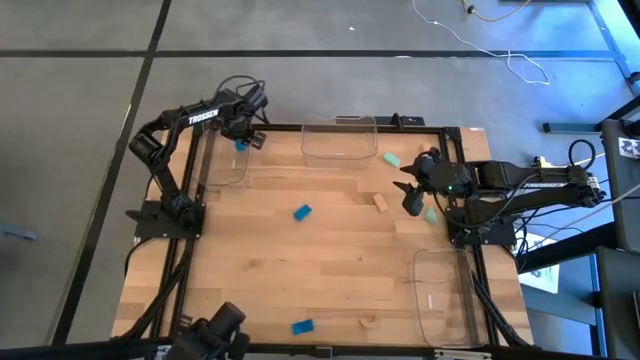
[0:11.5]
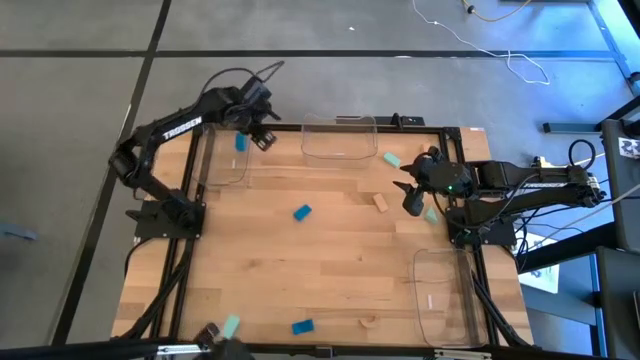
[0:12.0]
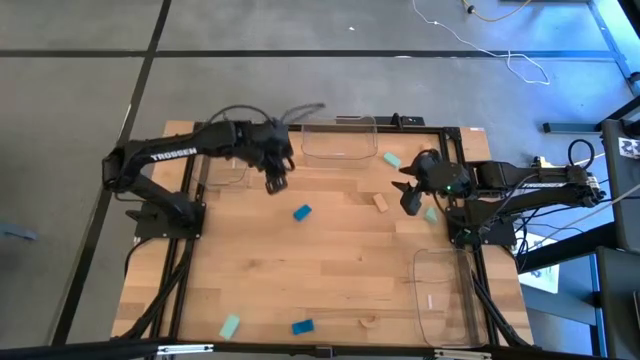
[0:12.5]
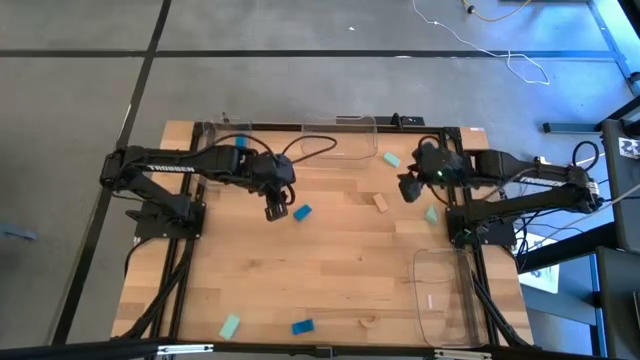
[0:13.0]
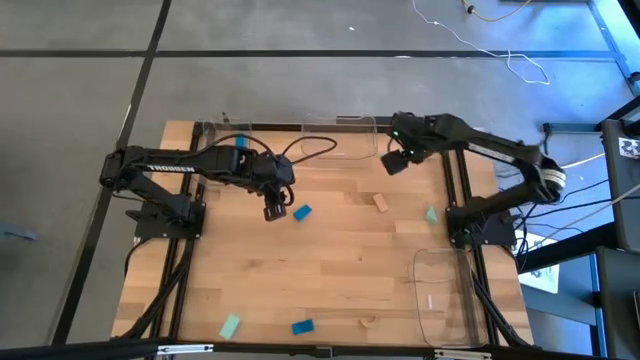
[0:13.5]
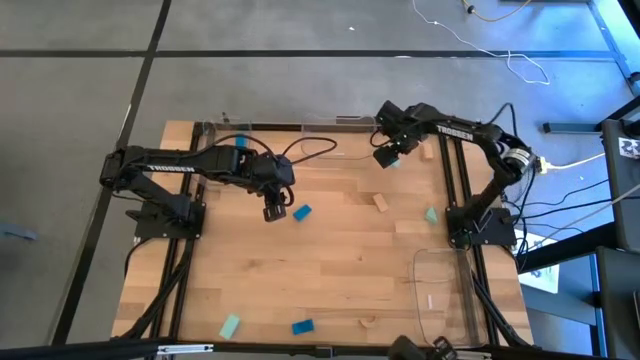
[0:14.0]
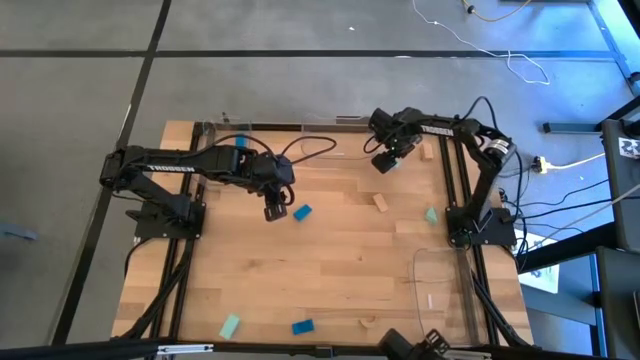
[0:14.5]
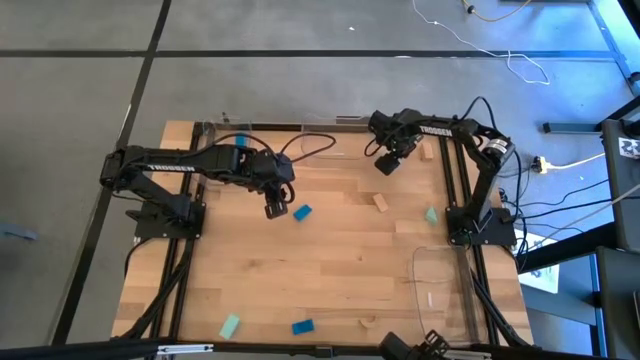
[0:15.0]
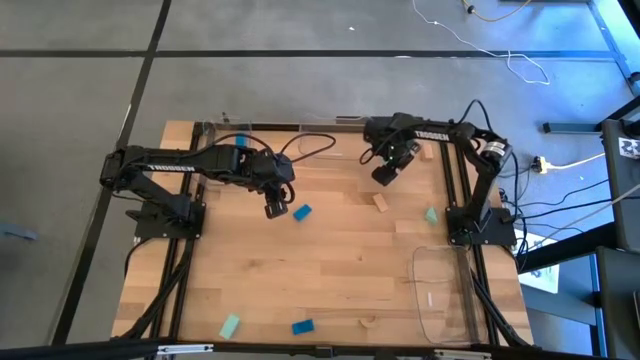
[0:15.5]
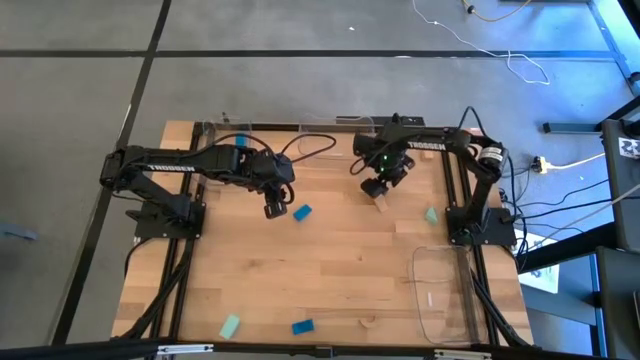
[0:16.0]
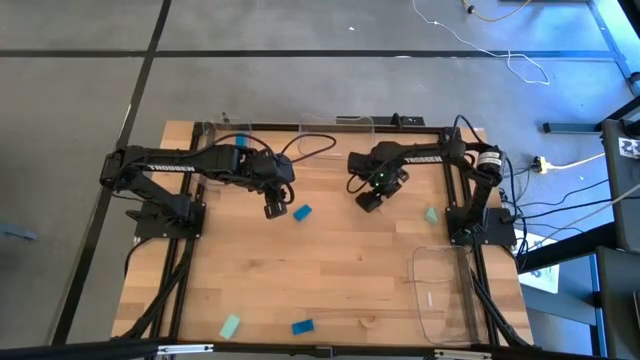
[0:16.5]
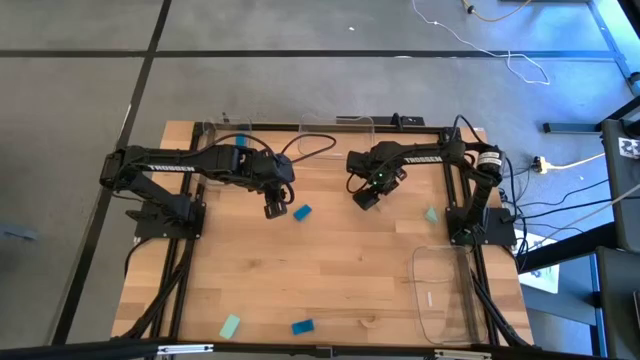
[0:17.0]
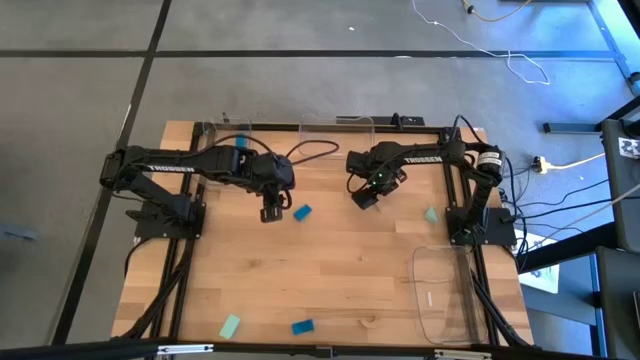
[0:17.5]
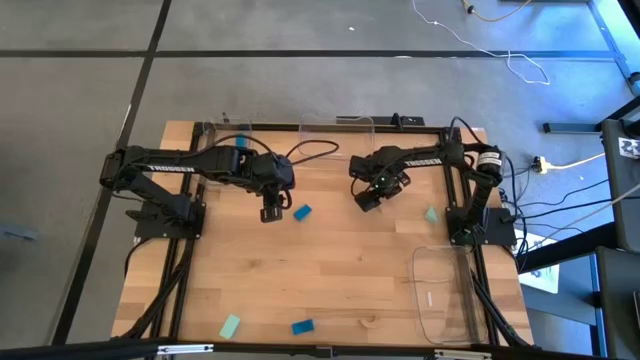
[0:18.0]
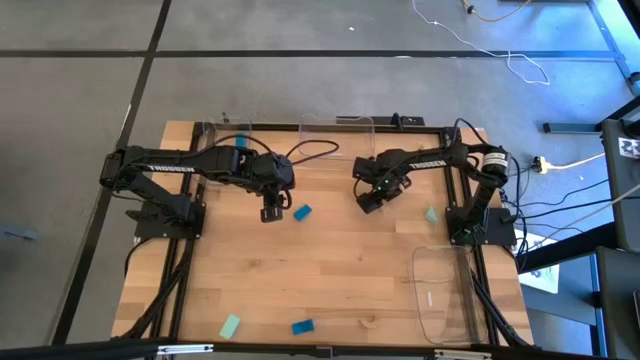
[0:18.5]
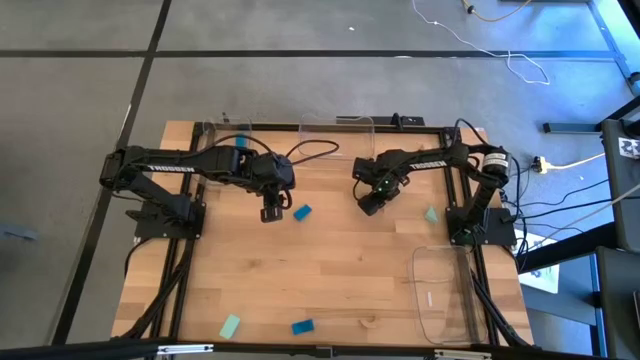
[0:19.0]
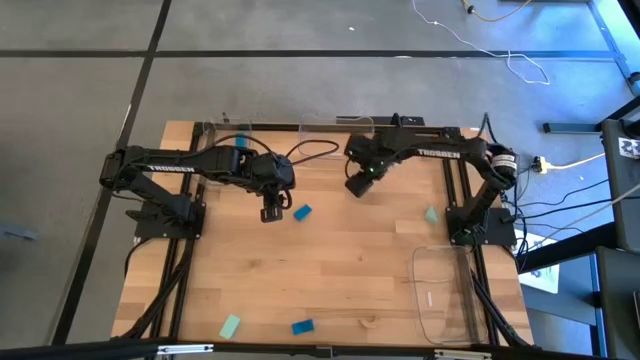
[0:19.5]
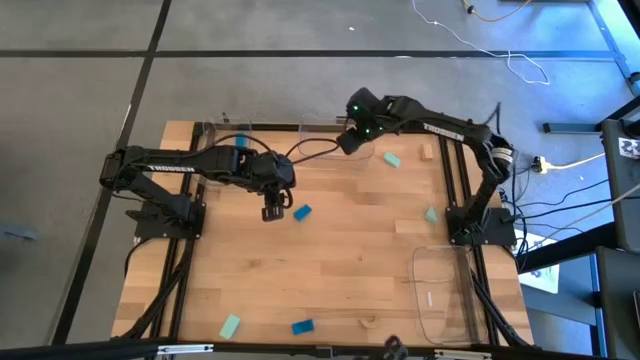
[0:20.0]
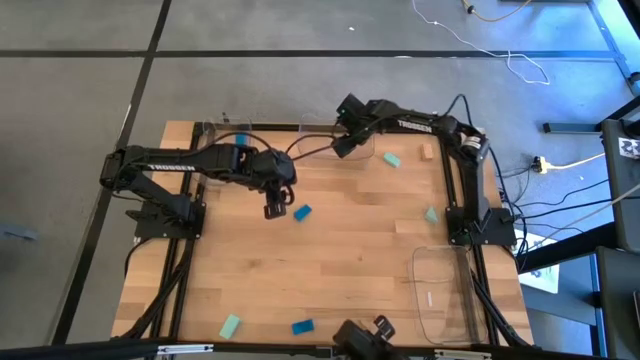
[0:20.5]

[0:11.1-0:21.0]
Task: Sort & place blocks by color
Put the middle brown block into the top middle transparent bin

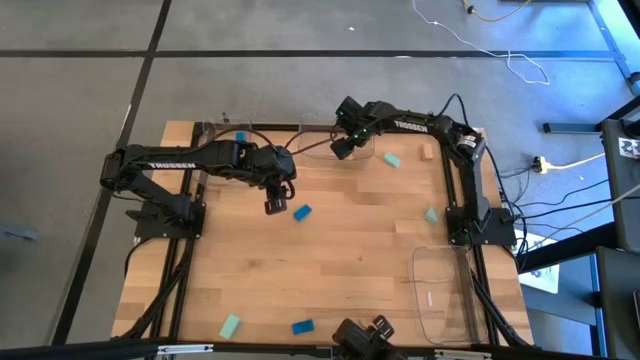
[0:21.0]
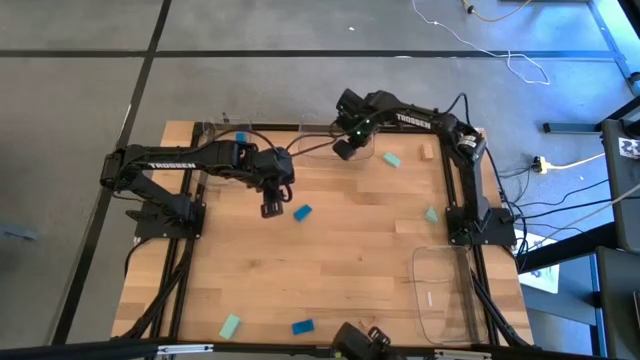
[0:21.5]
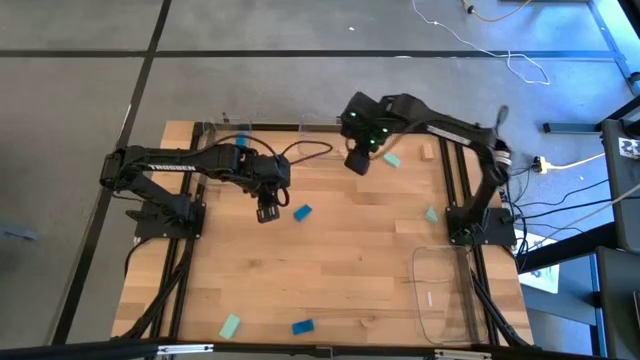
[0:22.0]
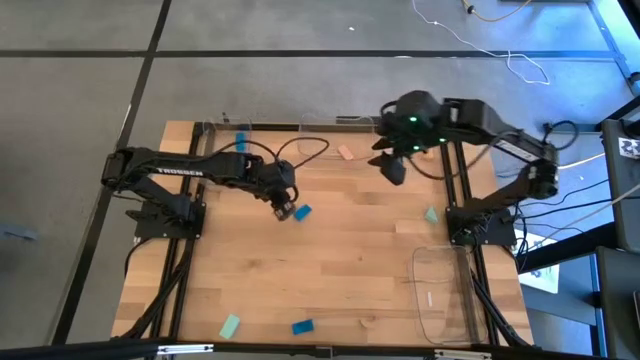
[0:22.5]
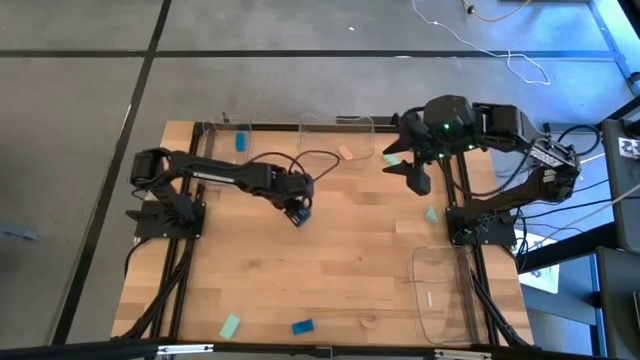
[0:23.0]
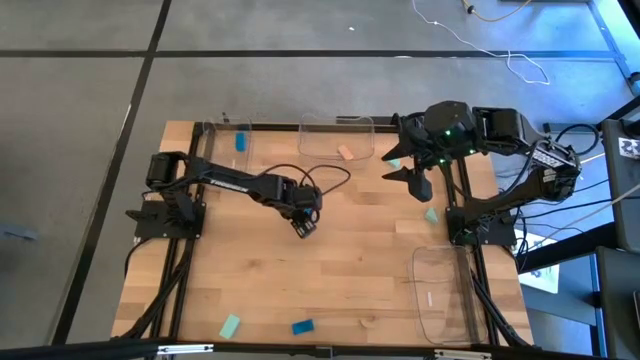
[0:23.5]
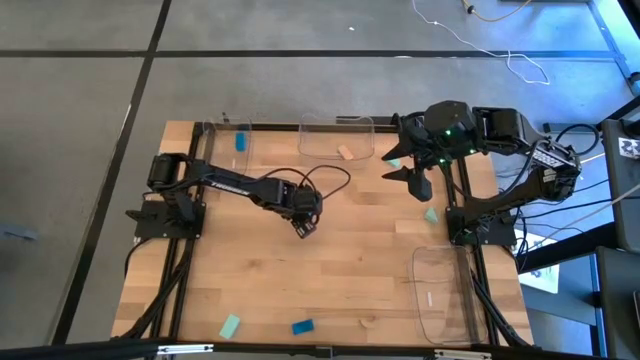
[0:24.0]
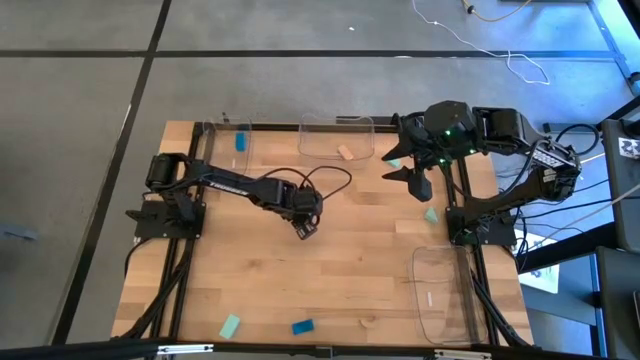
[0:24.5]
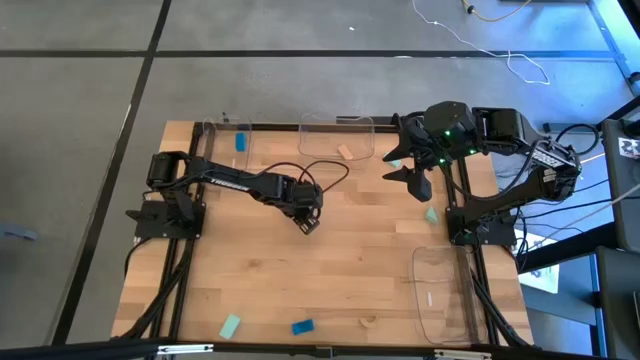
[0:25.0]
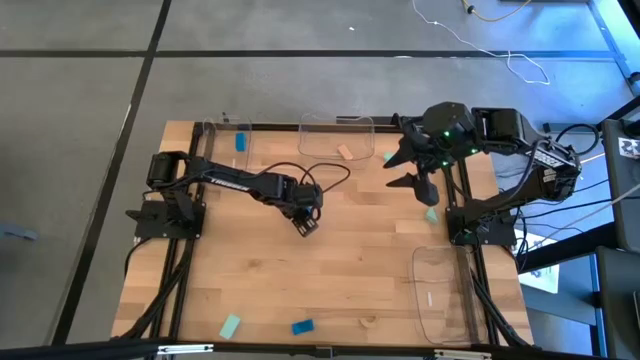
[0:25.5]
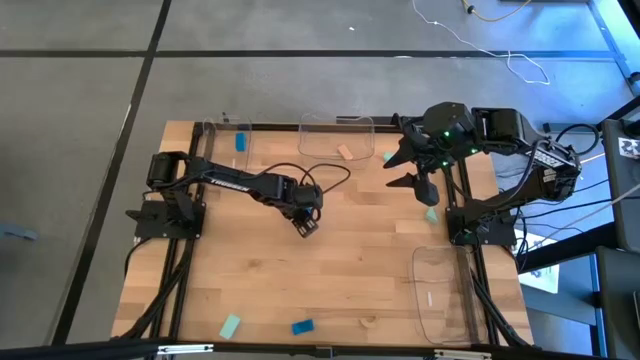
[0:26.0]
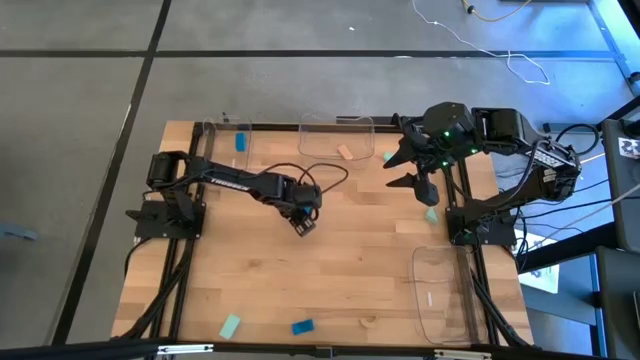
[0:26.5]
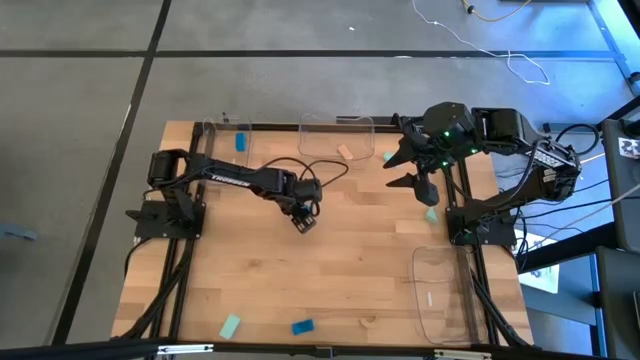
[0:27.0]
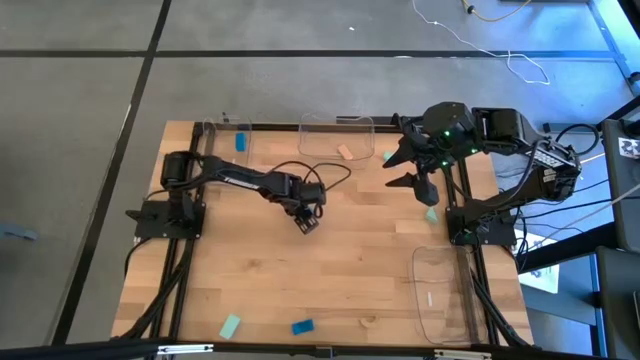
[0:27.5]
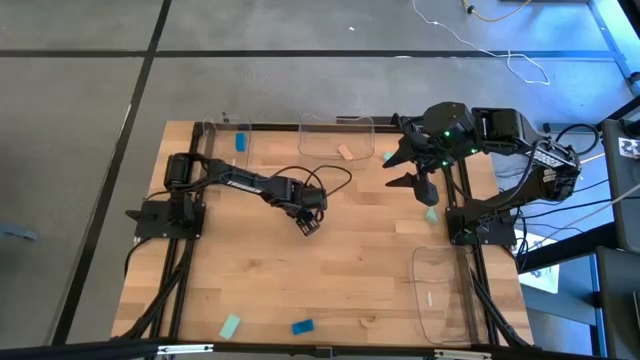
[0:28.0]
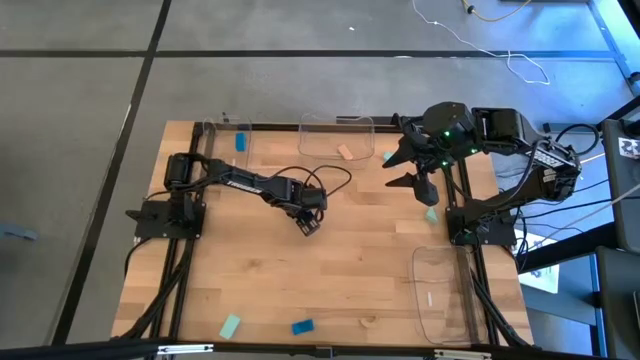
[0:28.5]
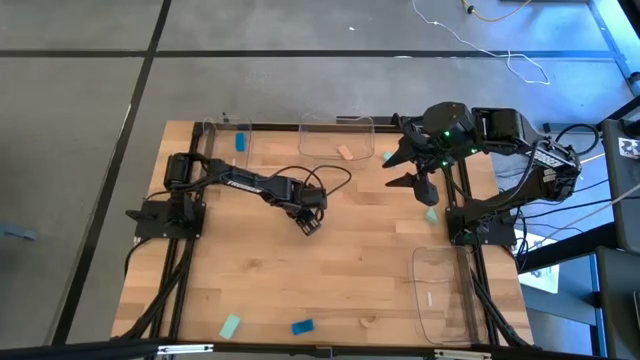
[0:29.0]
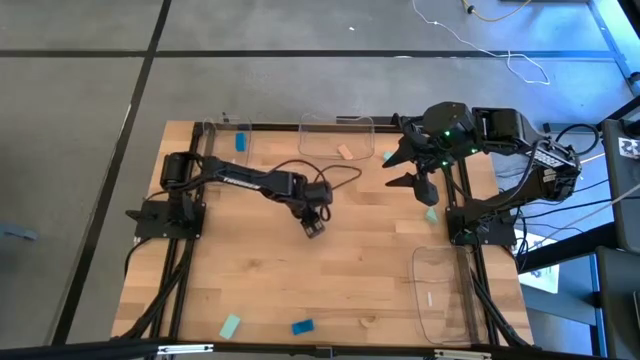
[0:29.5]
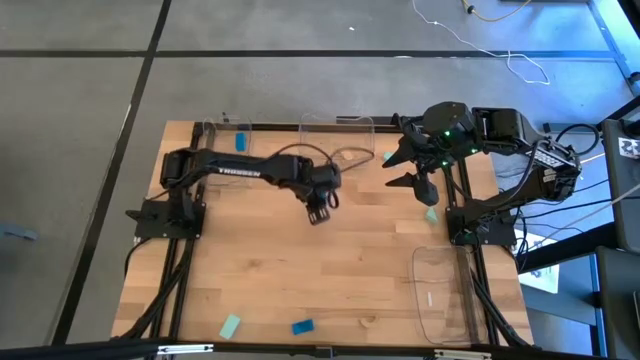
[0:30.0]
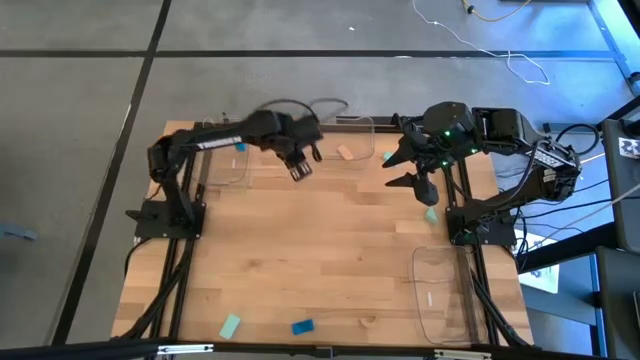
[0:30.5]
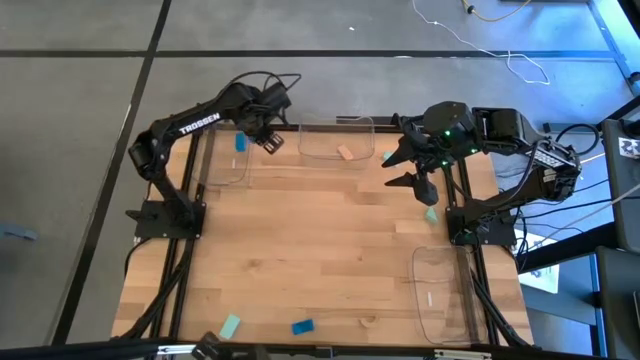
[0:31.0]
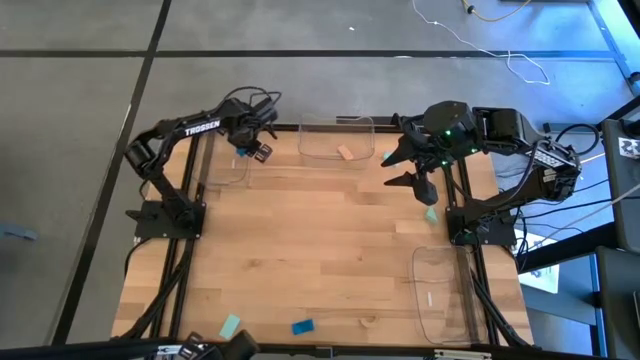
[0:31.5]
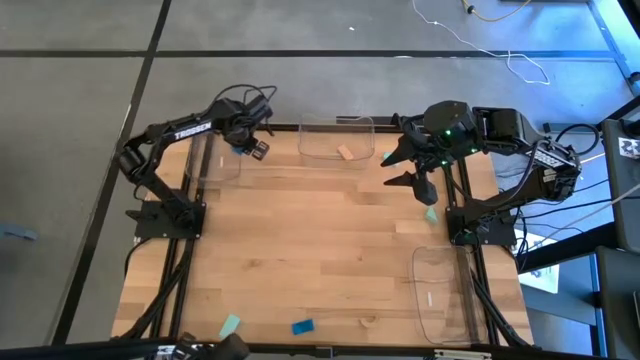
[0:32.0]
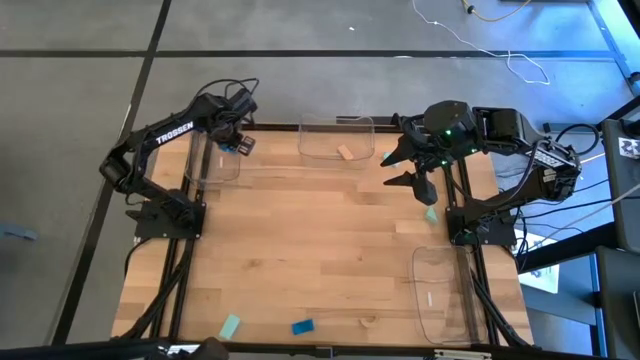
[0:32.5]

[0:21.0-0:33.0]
Put the top blue block into the top left transparent bin
